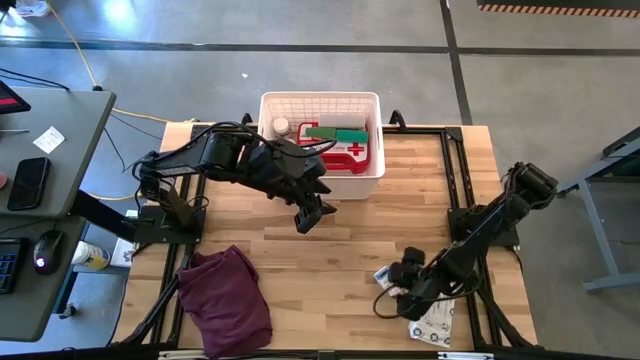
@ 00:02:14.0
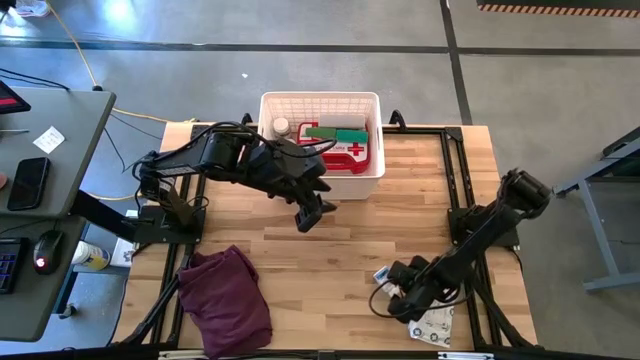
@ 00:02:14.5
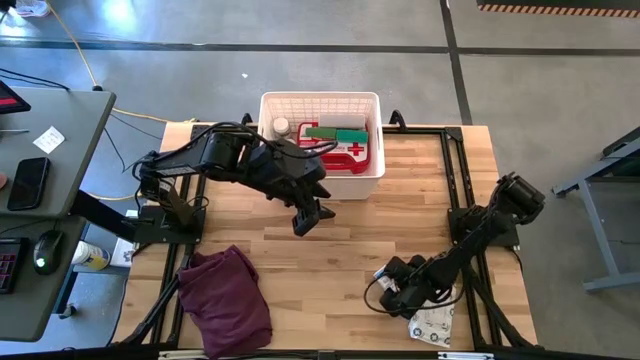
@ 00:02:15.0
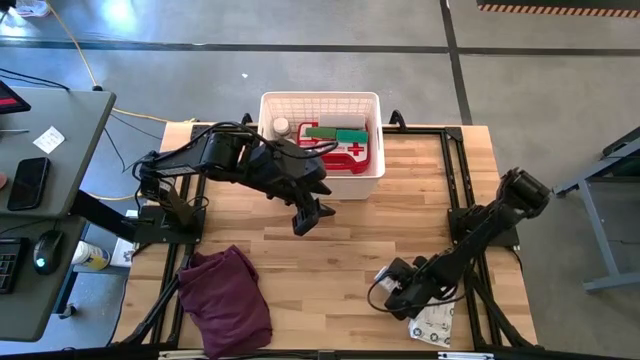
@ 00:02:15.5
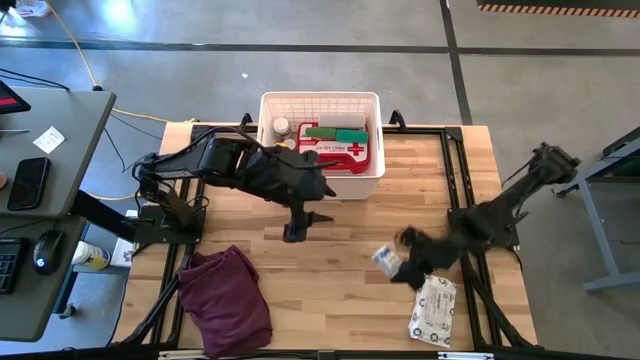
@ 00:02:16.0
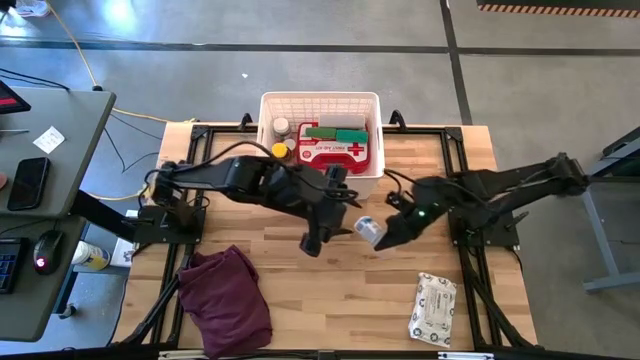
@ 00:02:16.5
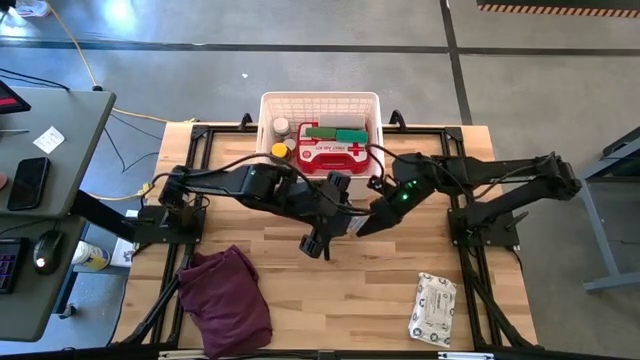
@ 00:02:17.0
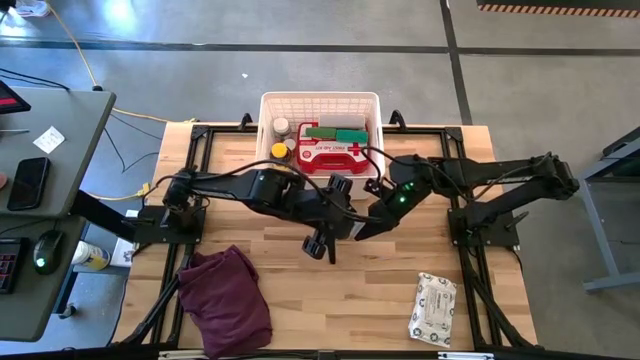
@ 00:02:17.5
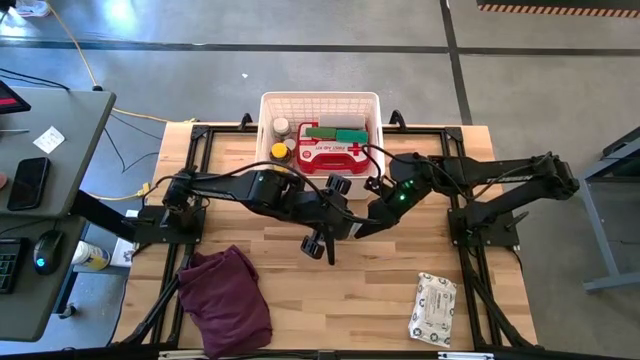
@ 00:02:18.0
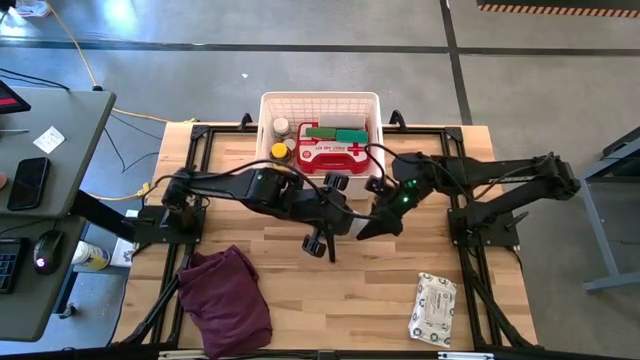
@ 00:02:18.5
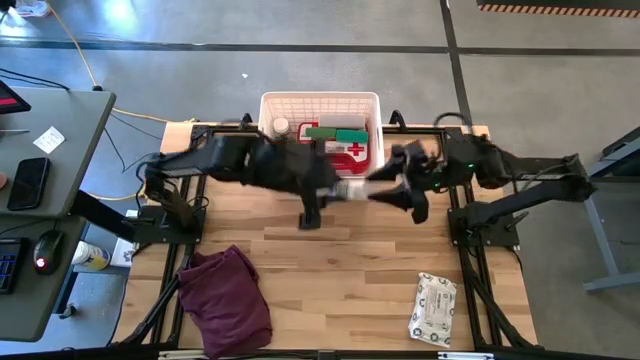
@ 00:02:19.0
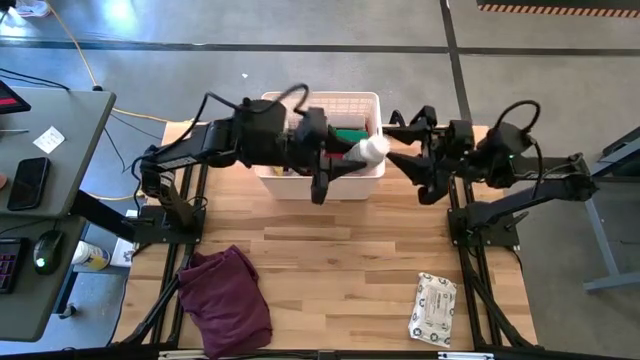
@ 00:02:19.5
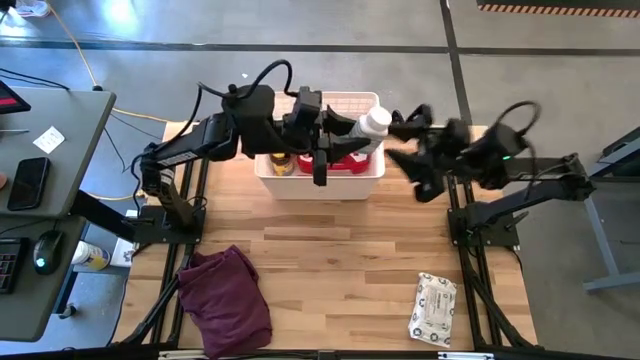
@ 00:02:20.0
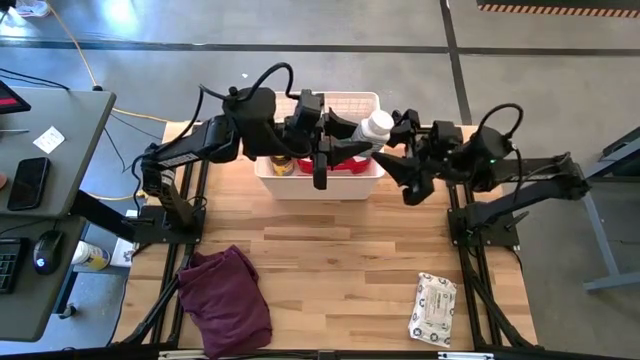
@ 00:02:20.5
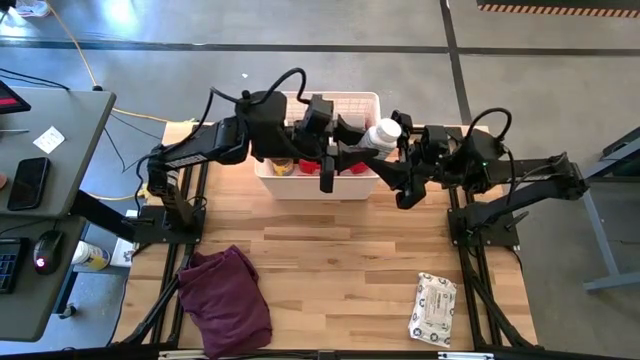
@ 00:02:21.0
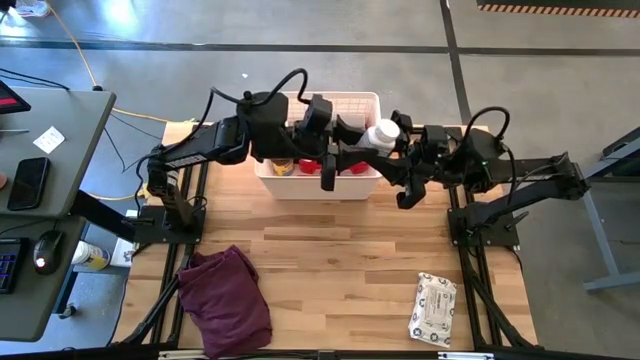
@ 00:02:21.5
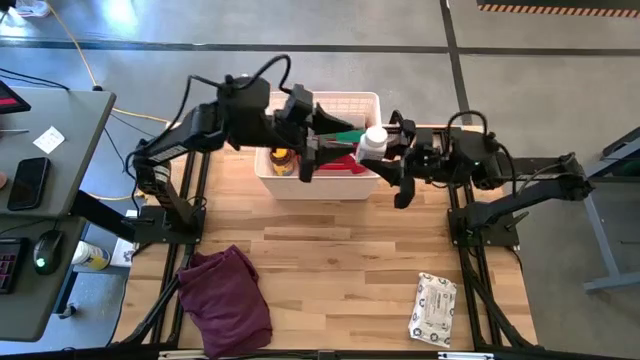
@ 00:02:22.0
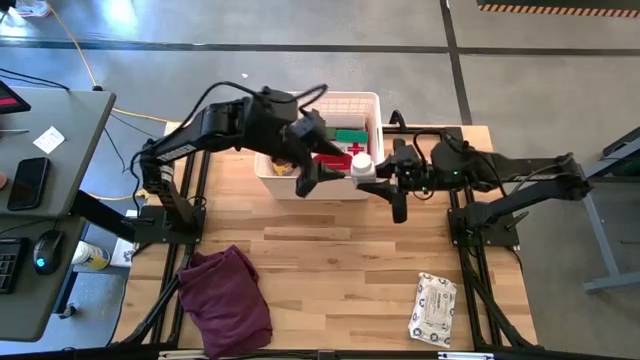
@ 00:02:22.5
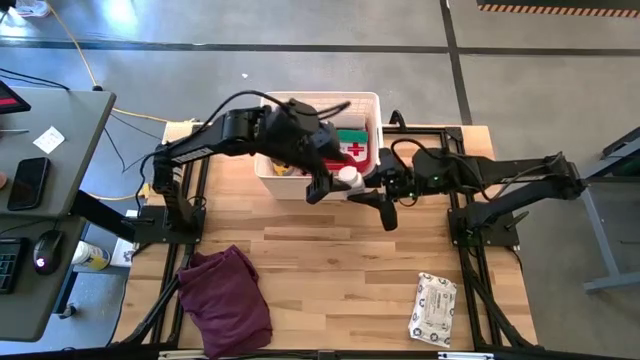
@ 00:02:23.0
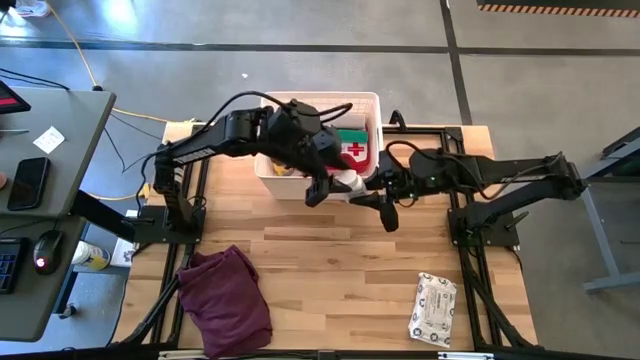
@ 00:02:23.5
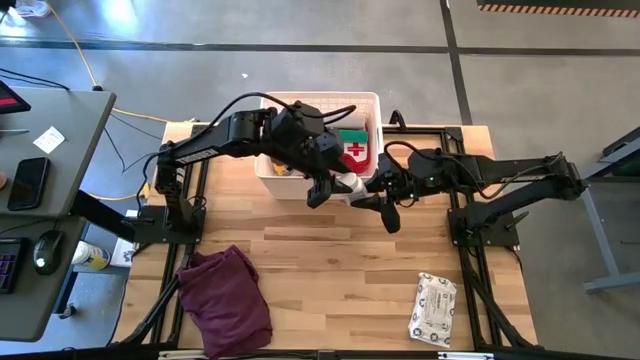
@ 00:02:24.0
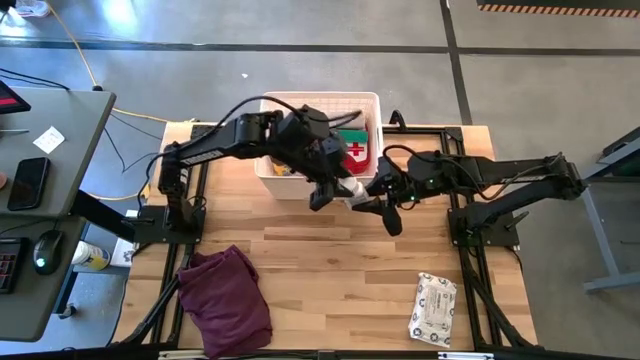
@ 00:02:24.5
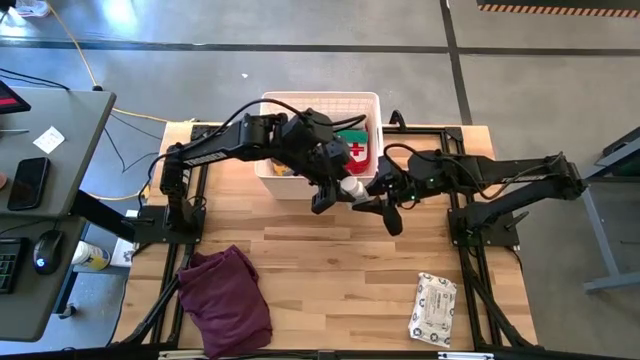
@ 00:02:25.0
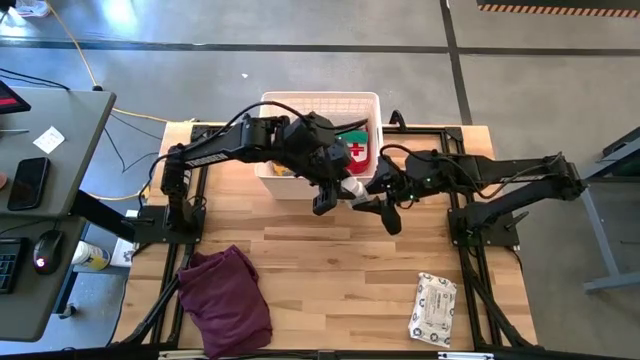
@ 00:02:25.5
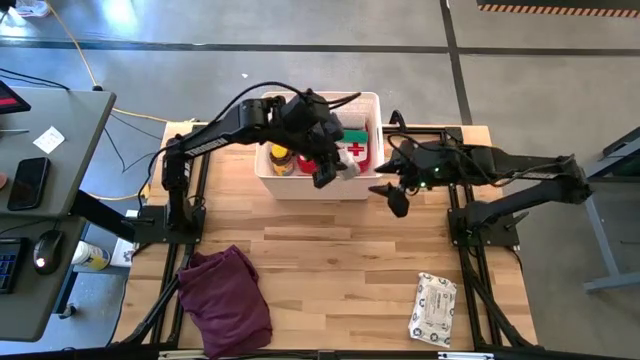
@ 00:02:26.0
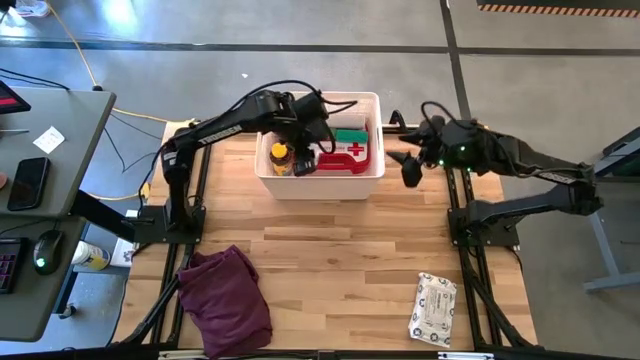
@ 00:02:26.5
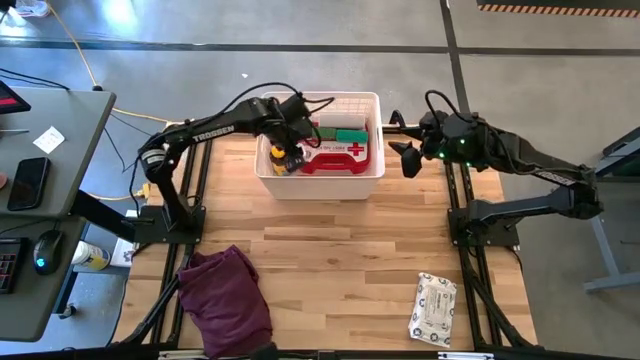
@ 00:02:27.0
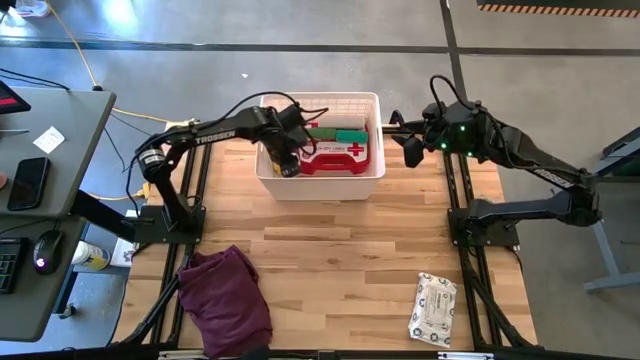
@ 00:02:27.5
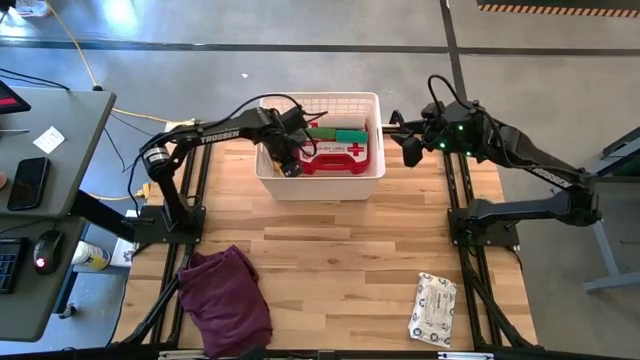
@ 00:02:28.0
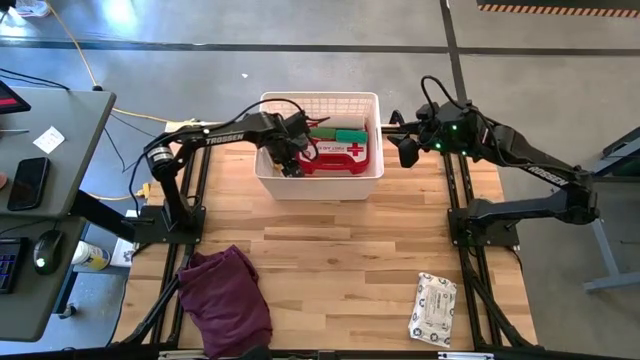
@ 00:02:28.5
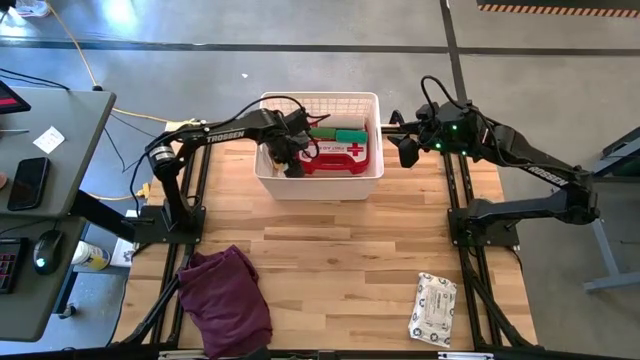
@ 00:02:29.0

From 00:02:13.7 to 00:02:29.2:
Task: Pick & place medical supplies in basket/bin
Put the white medicine bottle into the white bin

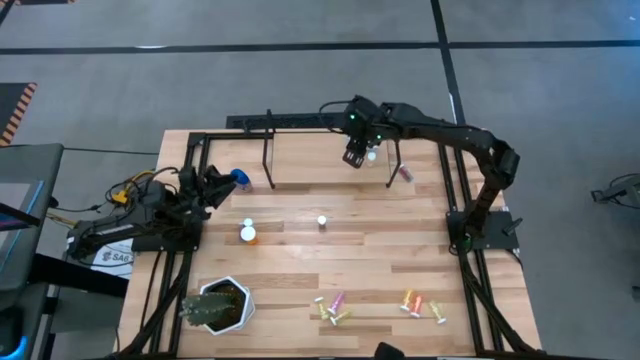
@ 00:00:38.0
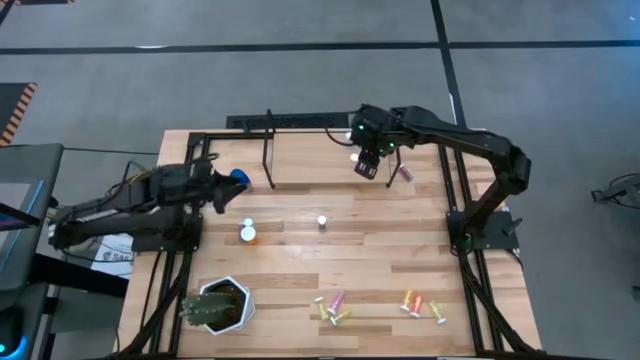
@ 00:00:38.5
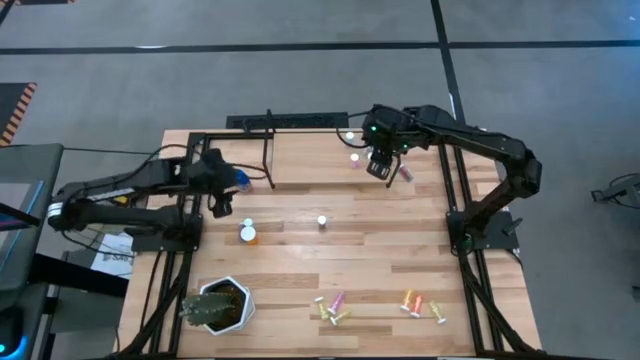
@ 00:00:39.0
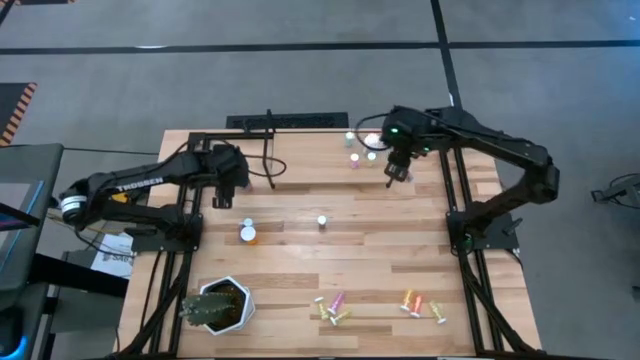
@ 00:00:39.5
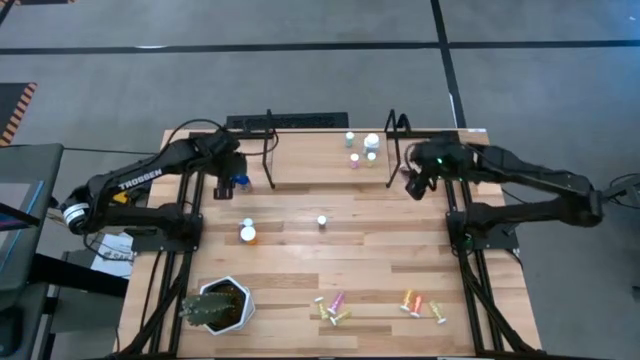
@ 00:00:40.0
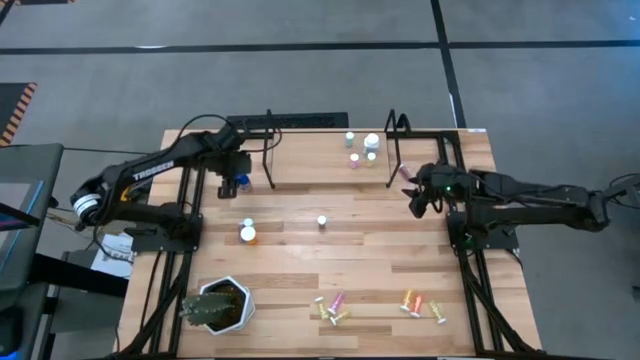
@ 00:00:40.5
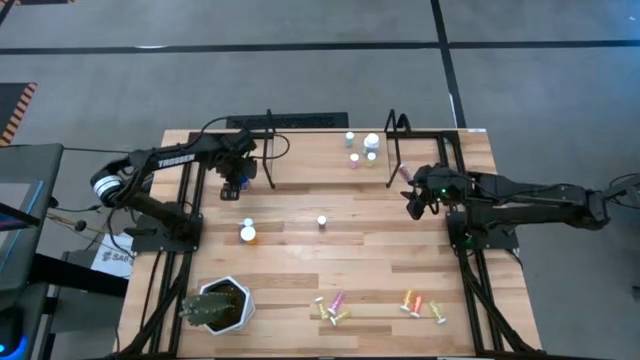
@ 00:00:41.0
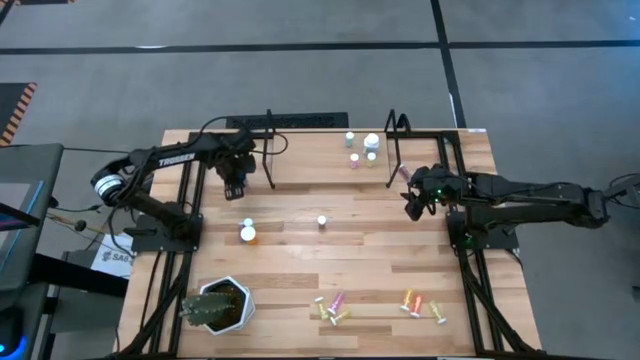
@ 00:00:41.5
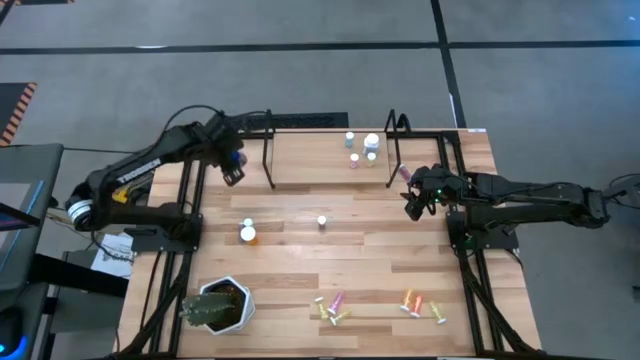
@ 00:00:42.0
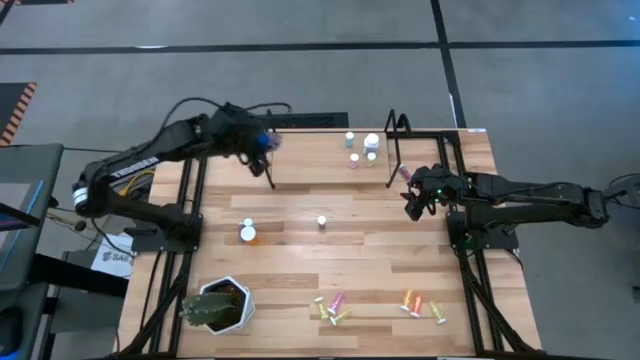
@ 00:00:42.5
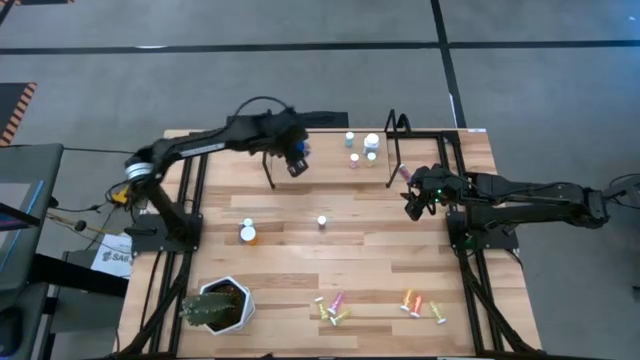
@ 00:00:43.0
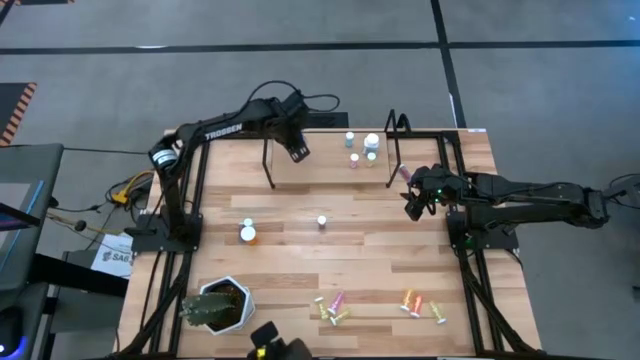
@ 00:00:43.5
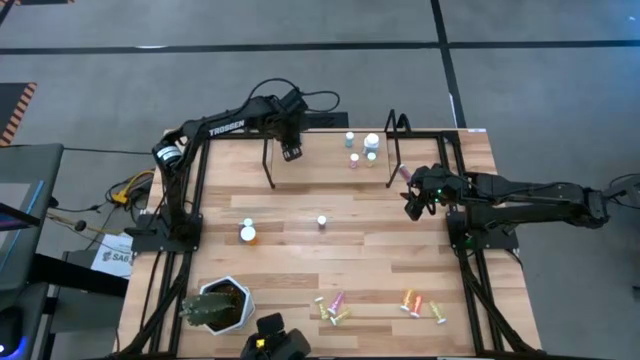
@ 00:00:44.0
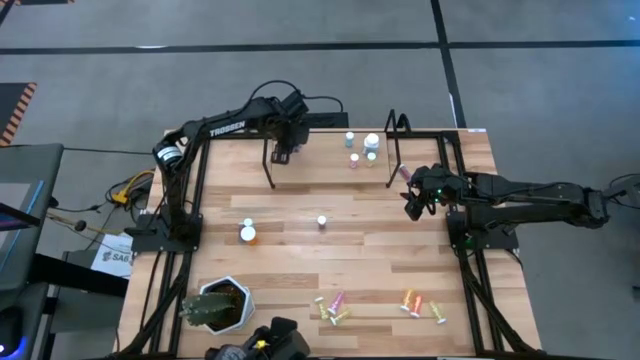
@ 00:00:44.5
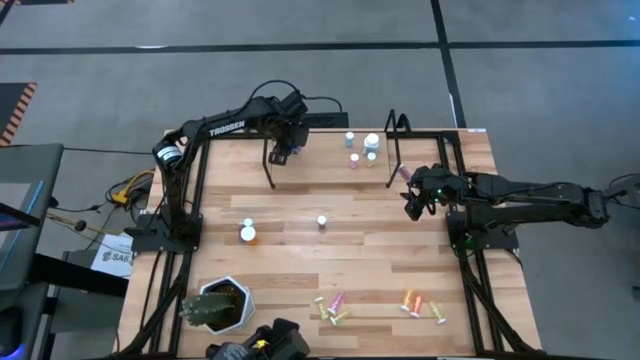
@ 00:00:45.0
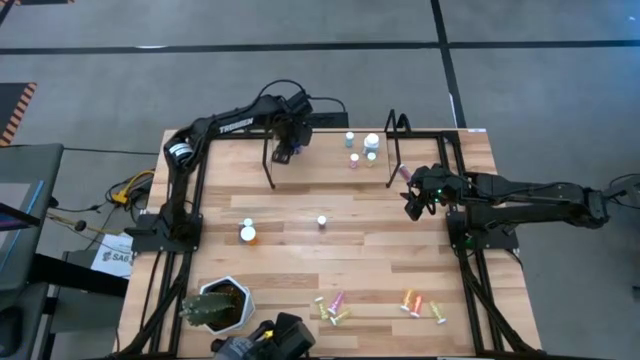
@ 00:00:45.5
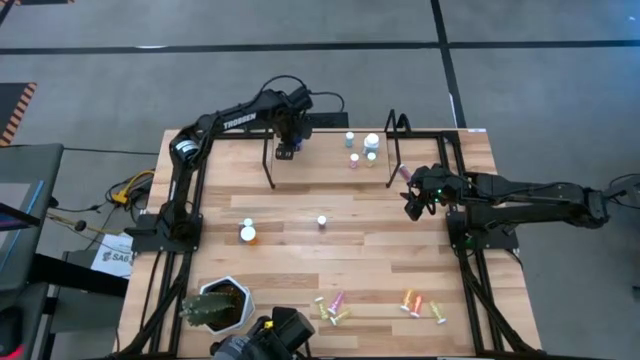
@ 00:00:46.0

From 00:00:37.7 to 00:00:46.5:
Task: Pick and place medicine bottles onto shelf by color
Put the transparent bottle on the shelf
